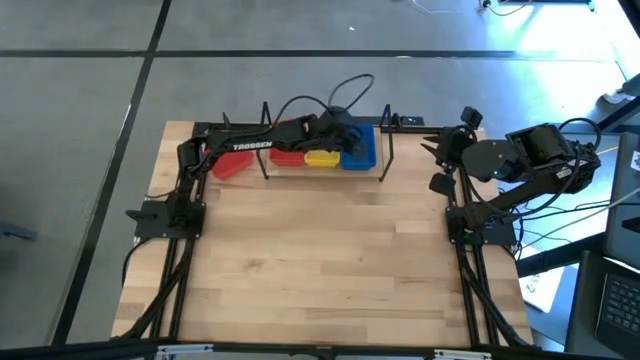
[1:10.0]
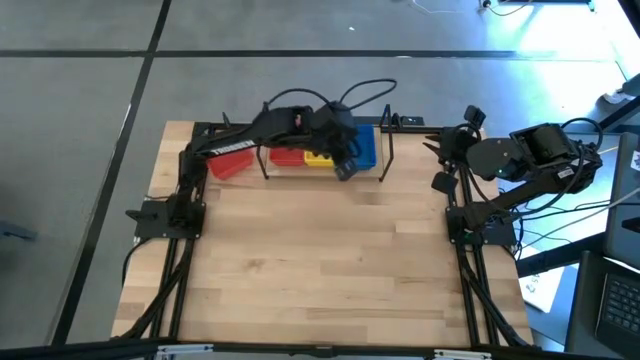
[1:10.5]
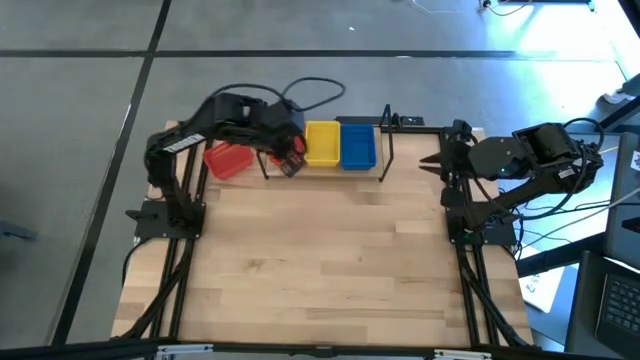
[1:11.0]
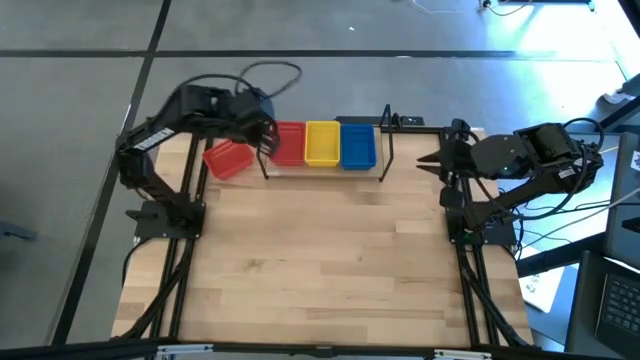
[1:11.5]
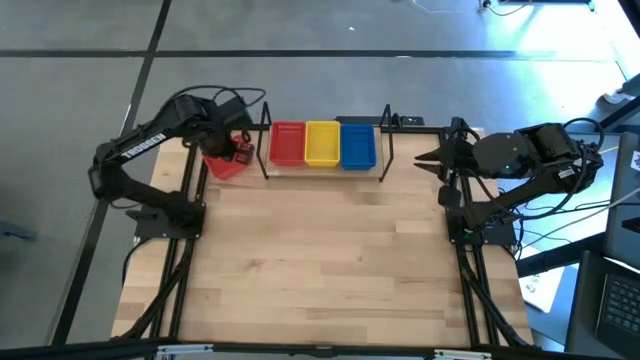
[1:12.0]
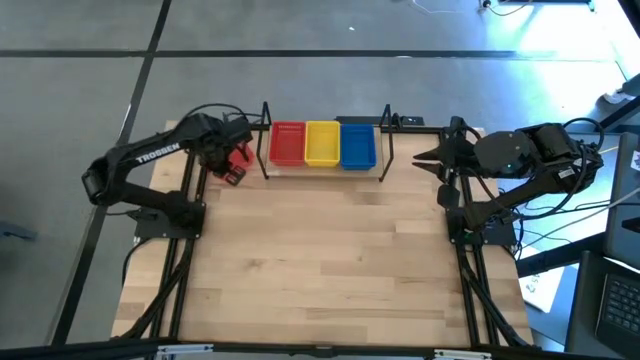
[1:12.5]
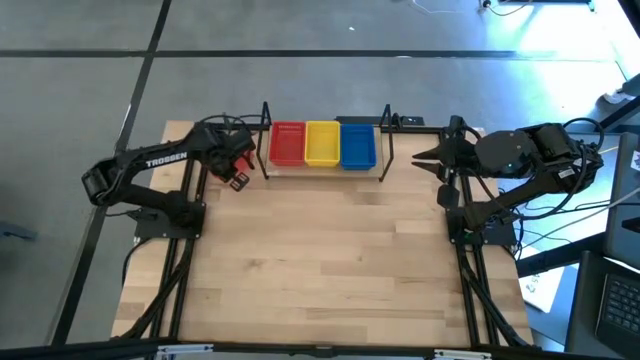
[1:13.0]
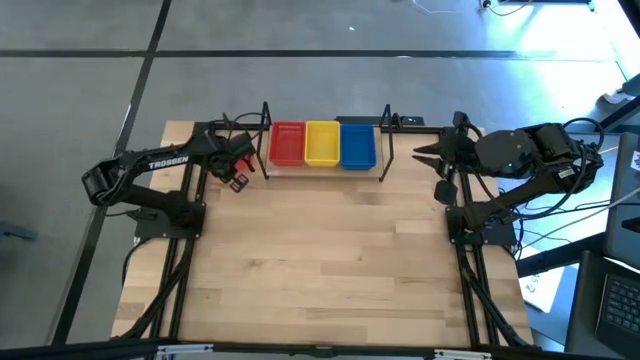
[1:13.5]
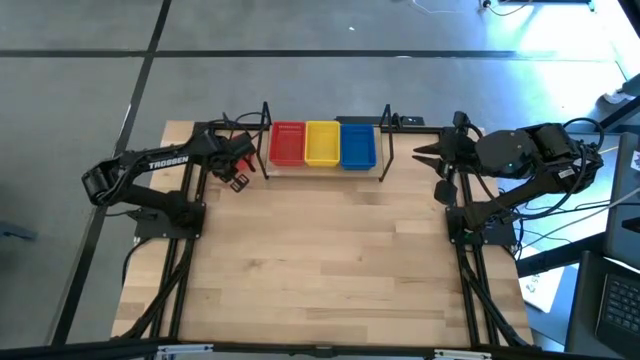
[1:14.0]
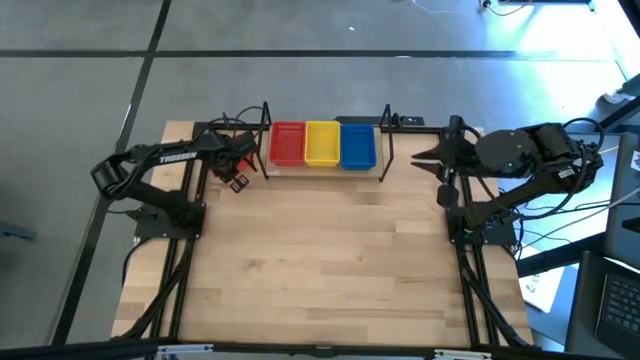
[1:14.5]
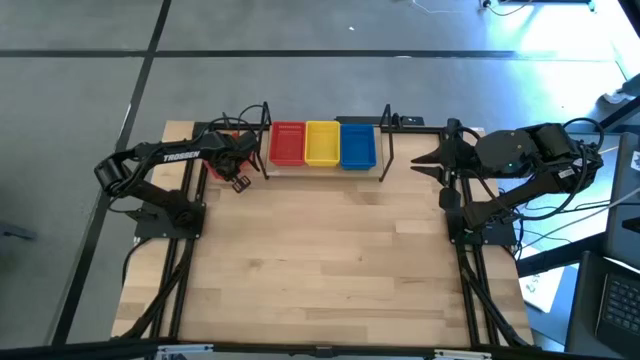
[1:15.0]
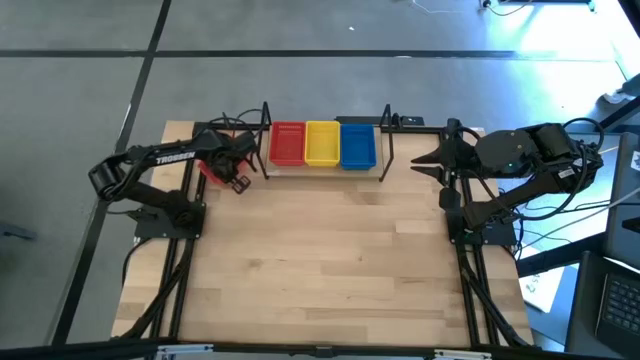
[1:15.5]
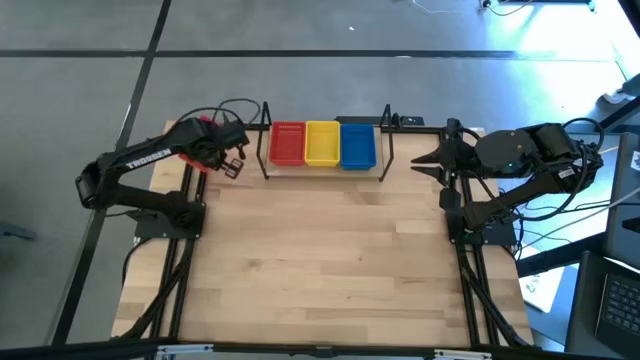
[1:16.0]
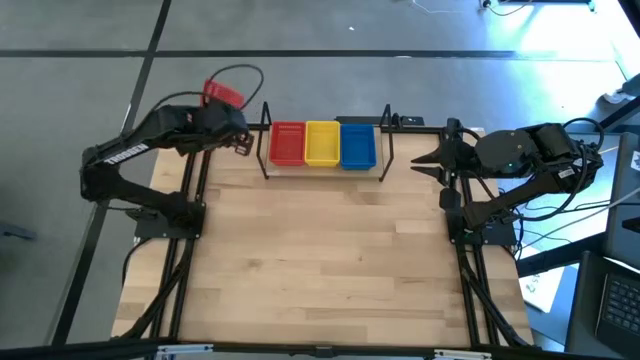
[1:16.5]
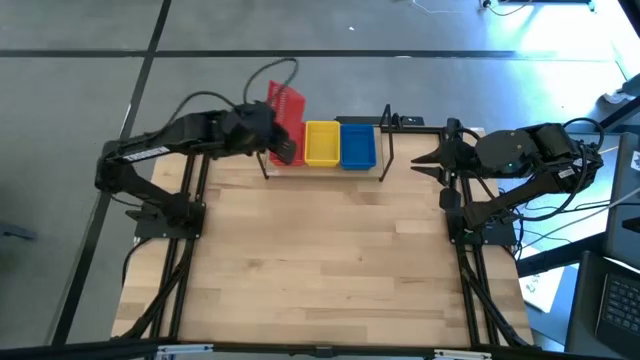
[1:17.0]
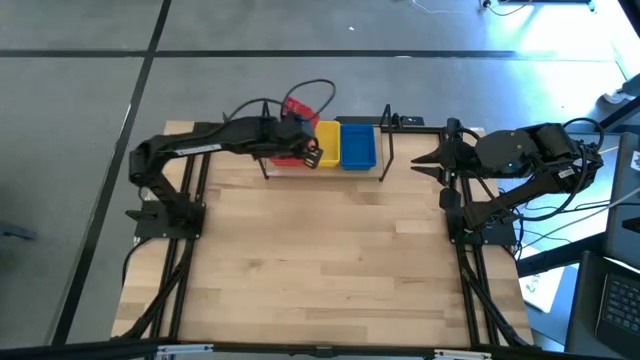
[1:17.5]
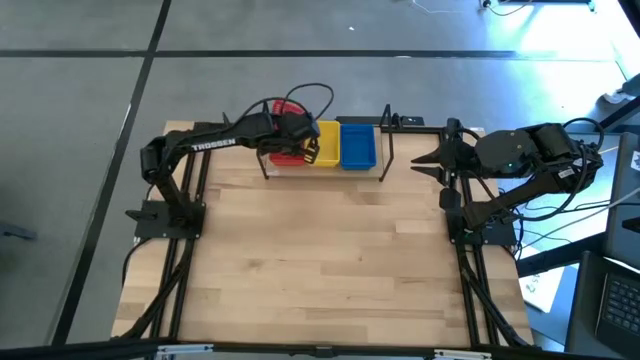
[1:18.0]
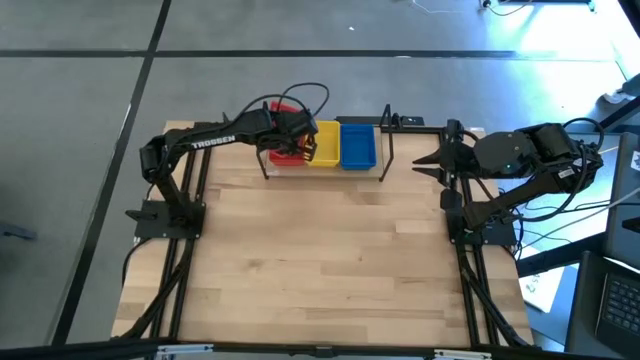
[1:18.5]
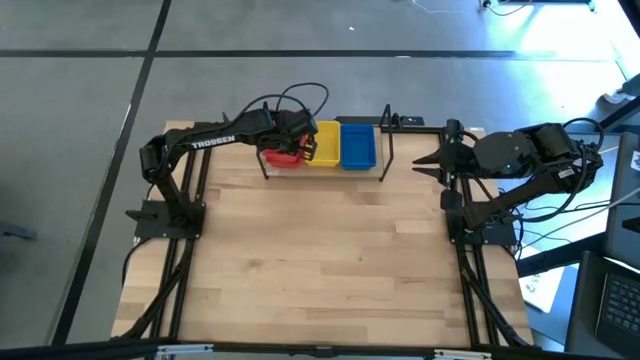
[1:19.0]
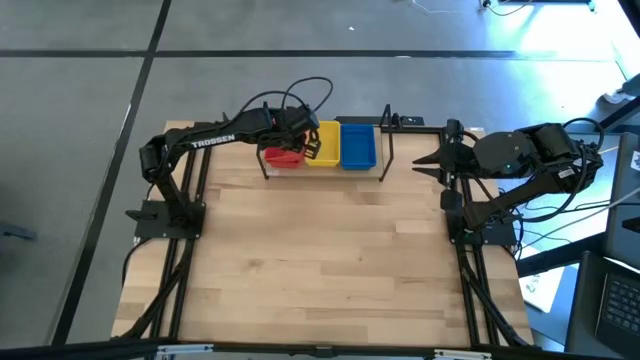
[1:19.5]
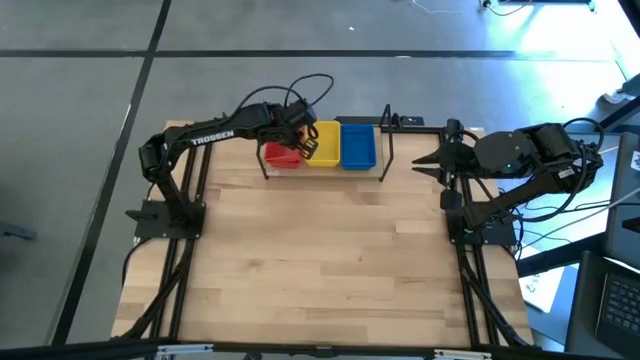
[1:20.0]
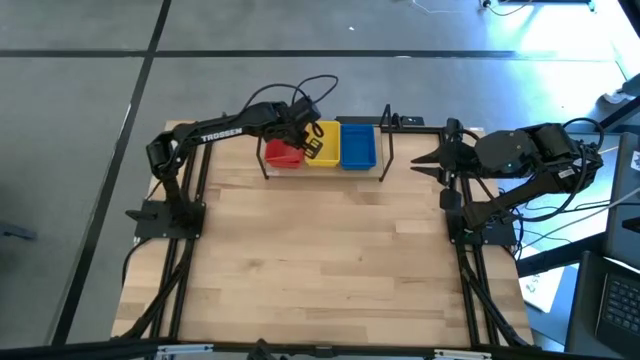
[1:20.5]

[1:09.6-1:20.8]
Task: Stack baskets on shelf by color
Stack the red bin on the red bin on the shelf

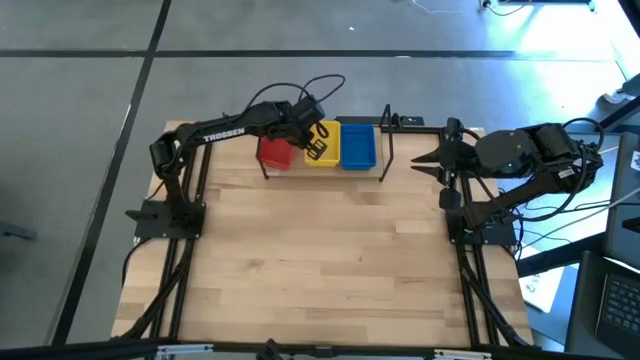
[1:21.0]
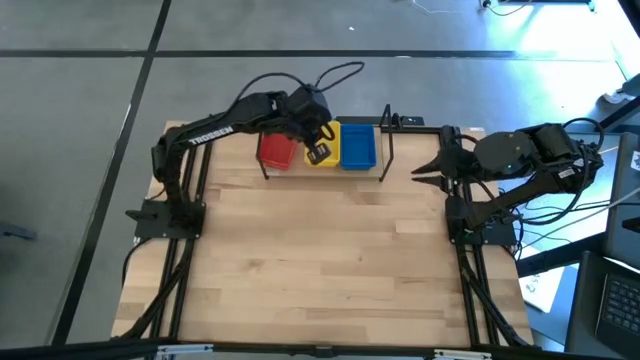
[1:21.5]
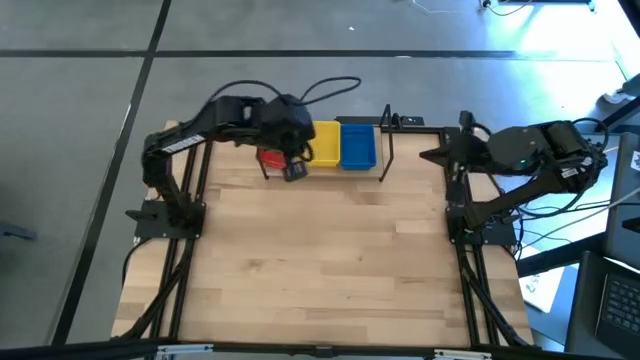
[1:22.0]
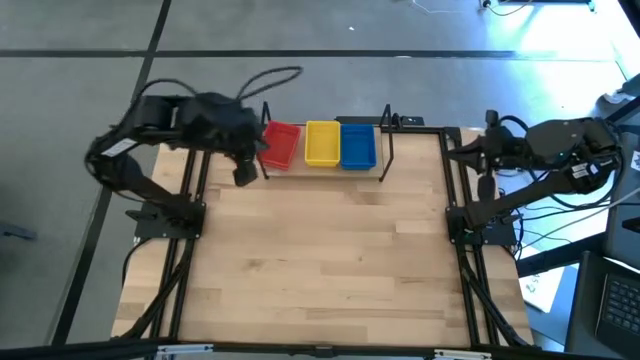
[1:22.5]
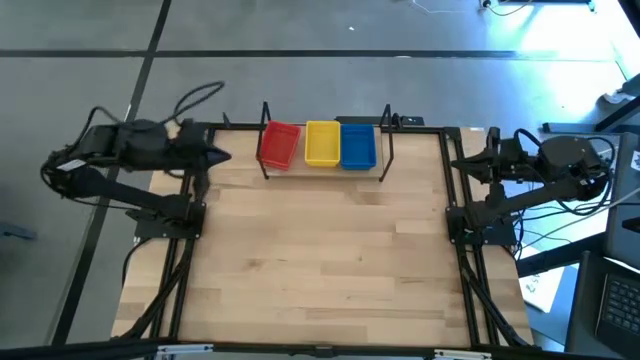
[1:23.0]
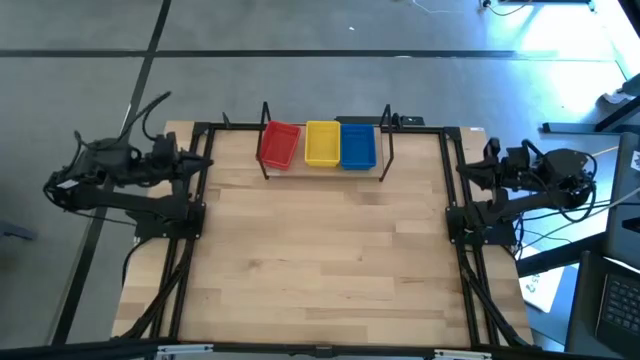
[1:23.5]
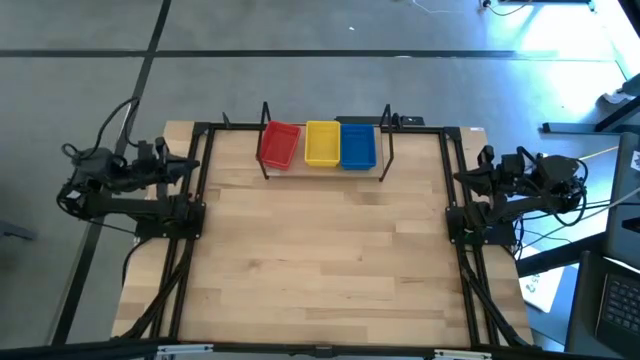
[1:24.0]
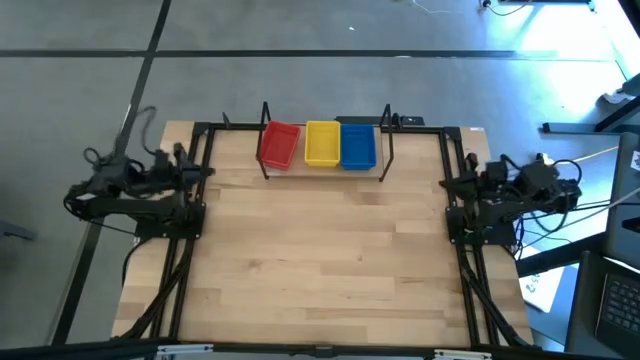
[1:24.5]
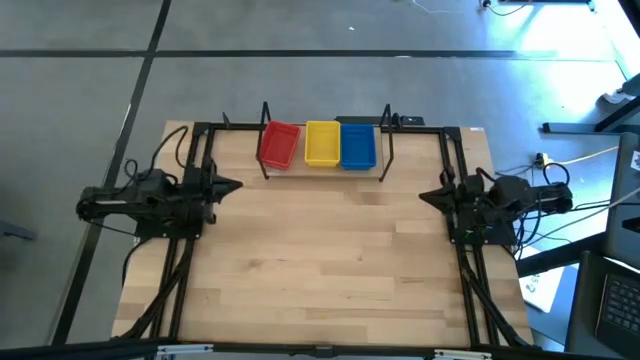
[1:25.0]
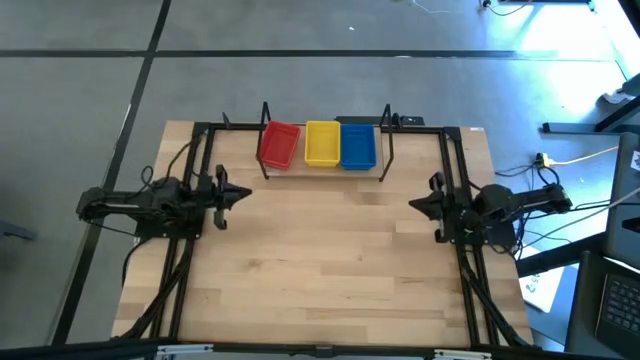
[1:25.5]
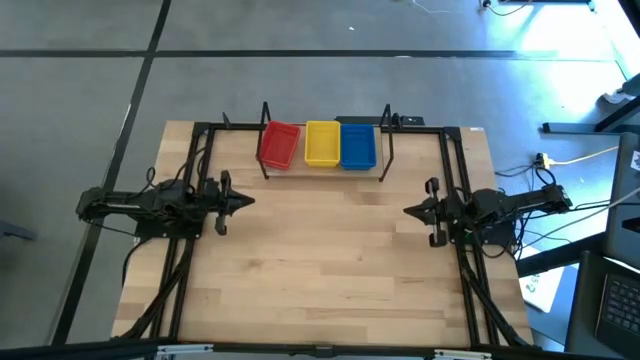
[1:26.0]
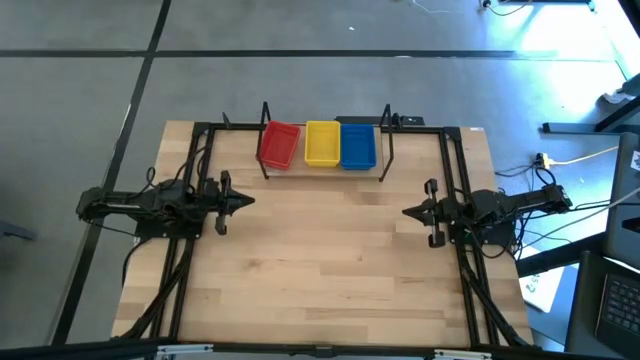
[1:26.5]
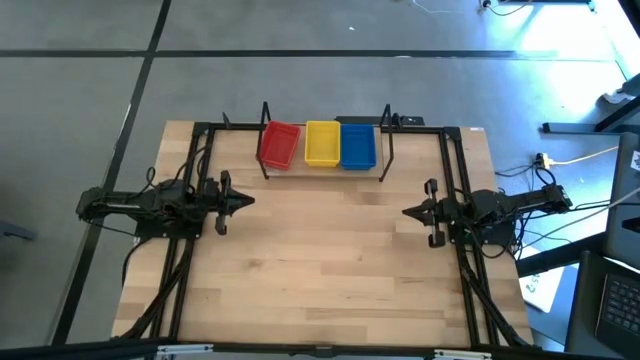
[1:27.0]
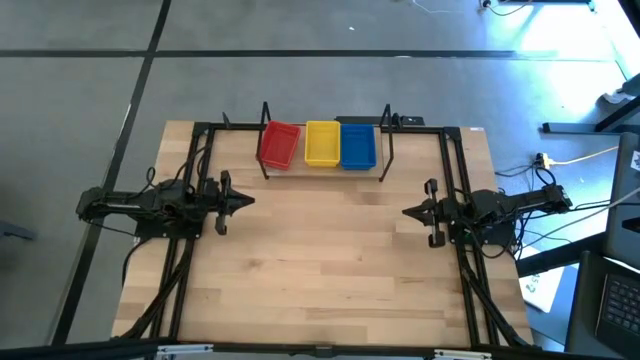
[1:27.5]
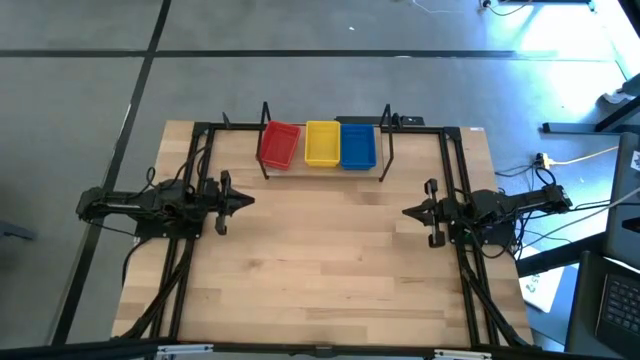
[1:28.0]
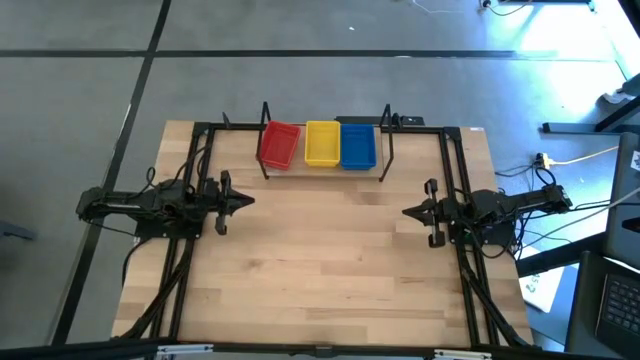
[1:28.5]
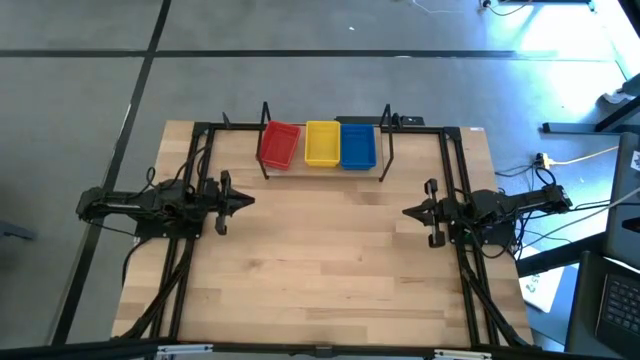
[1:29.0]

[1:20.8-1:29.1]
Return to Home Position

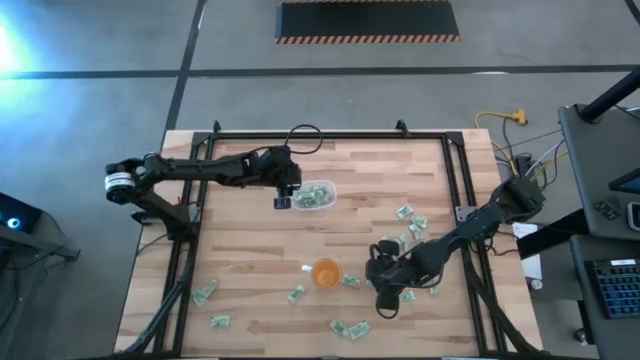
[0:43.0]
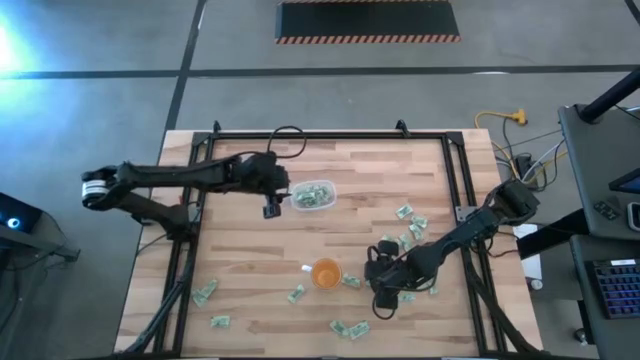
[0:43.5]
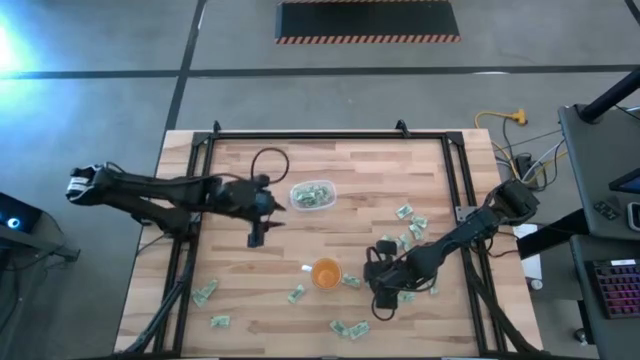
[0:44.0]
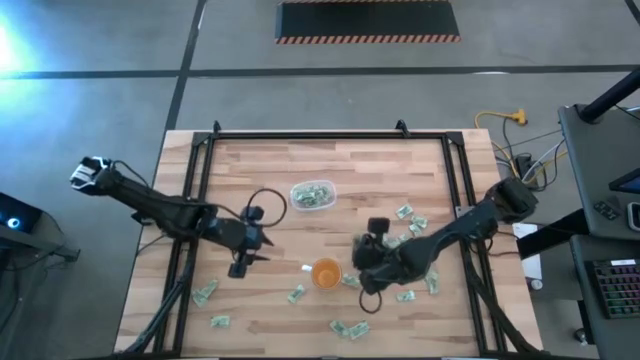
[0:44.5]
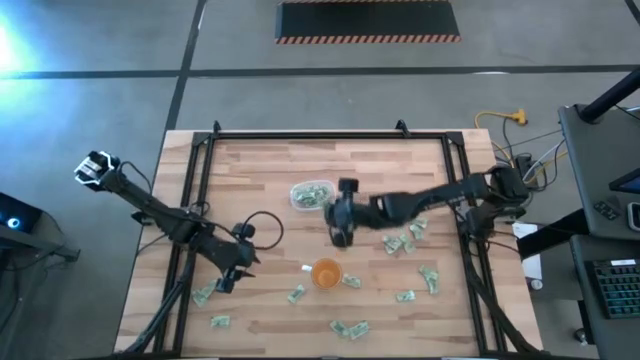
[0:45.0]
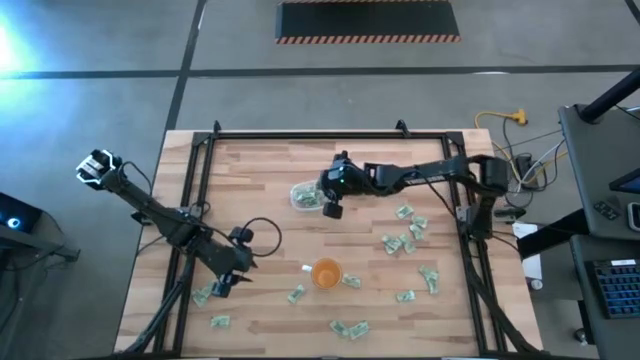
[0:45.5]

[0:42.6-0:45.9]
Task: Pick and place Stevia / Truvia into bins
Put the stevia packet into the transparent bin
